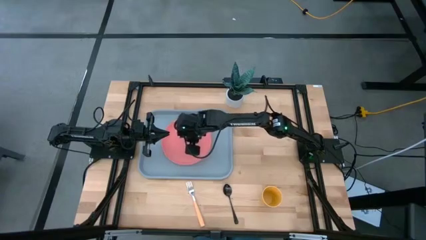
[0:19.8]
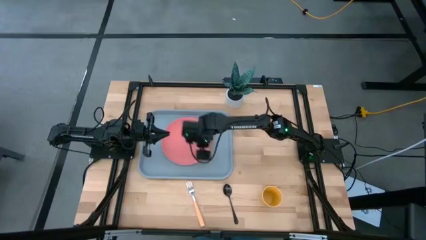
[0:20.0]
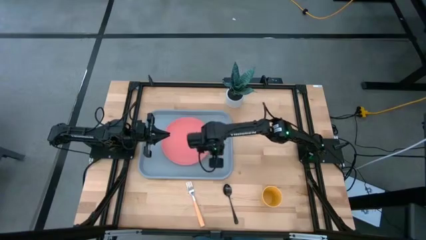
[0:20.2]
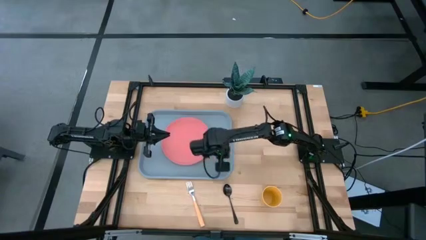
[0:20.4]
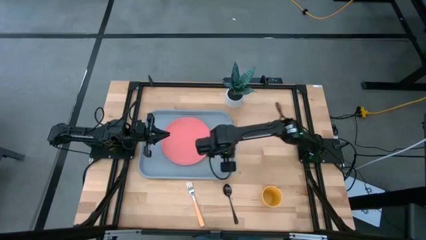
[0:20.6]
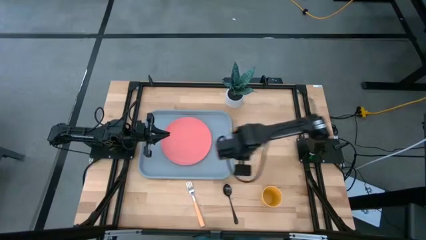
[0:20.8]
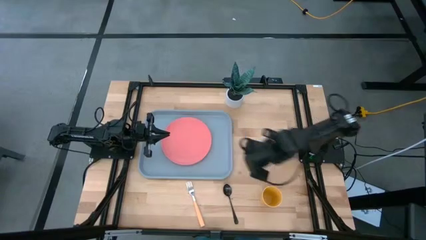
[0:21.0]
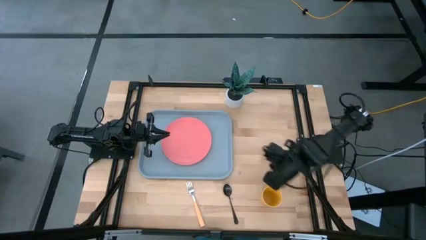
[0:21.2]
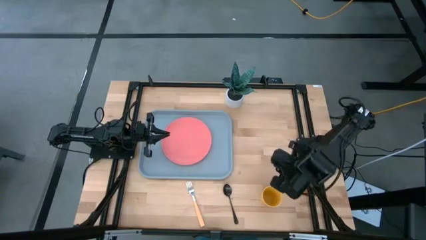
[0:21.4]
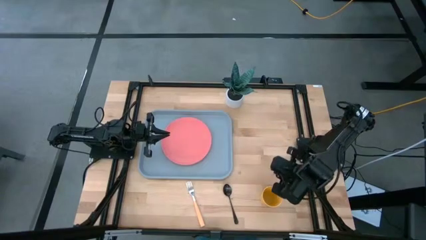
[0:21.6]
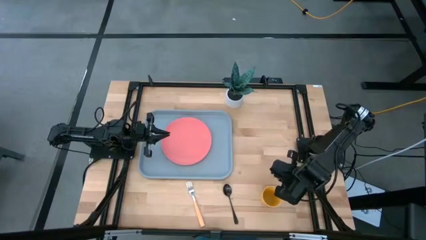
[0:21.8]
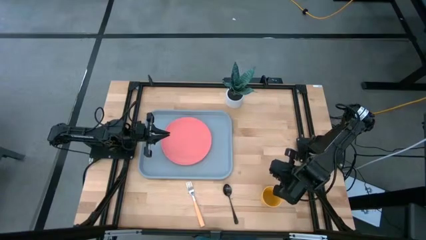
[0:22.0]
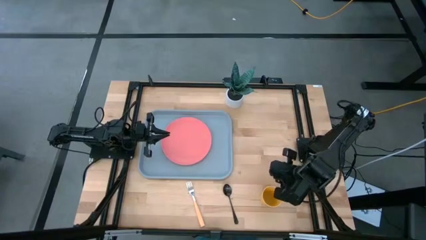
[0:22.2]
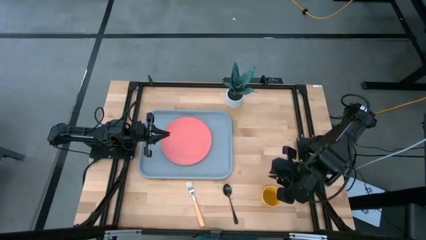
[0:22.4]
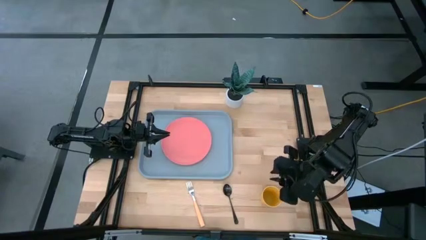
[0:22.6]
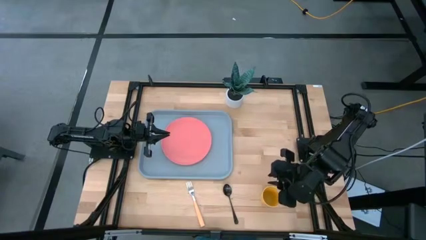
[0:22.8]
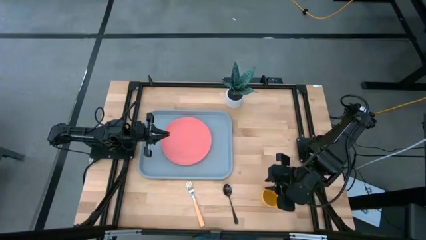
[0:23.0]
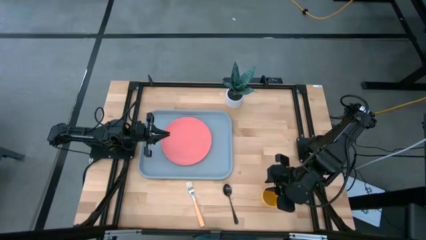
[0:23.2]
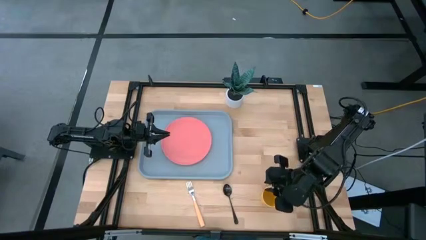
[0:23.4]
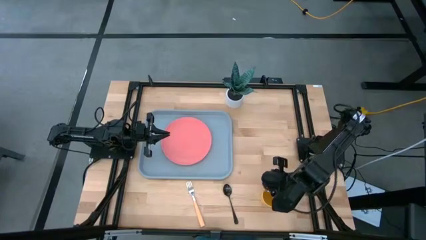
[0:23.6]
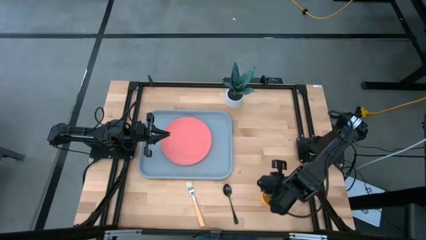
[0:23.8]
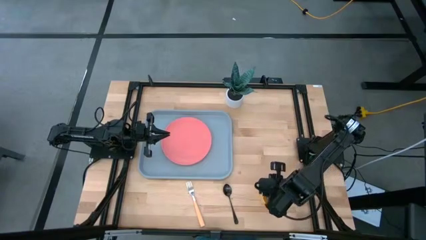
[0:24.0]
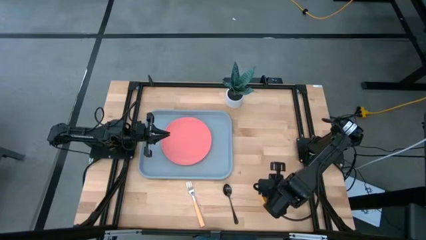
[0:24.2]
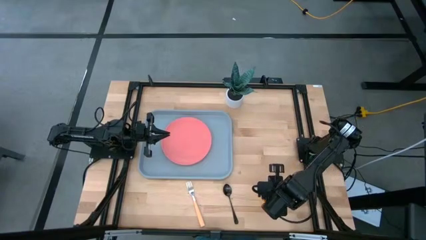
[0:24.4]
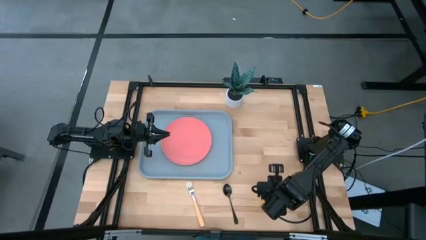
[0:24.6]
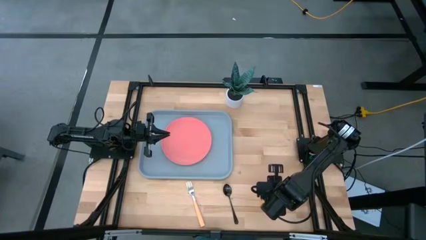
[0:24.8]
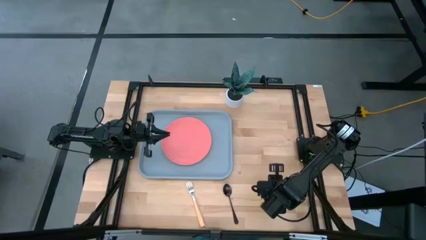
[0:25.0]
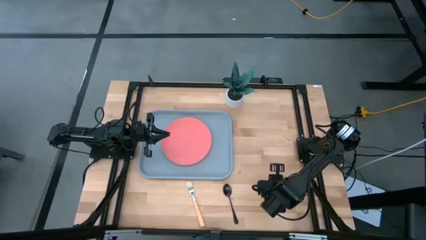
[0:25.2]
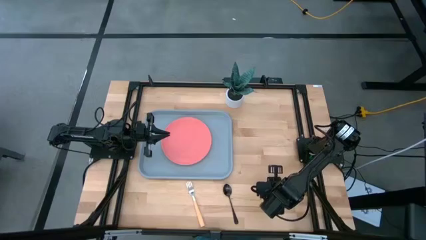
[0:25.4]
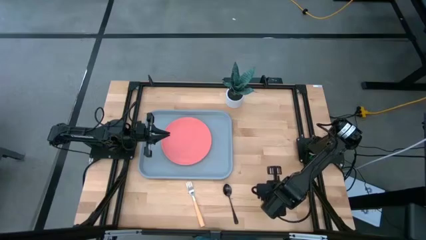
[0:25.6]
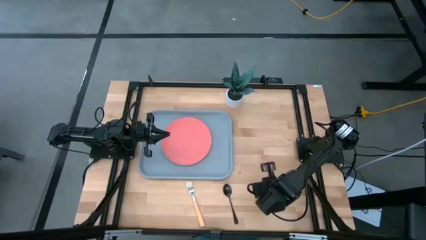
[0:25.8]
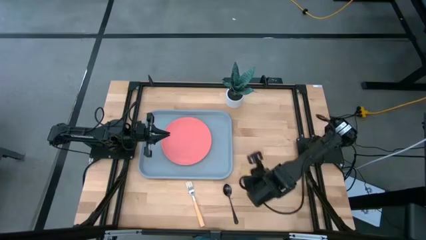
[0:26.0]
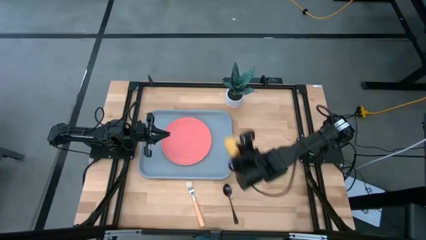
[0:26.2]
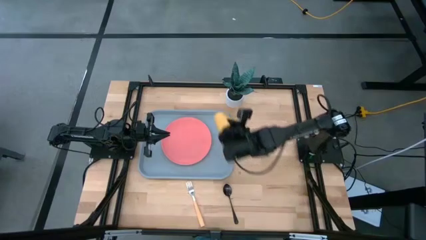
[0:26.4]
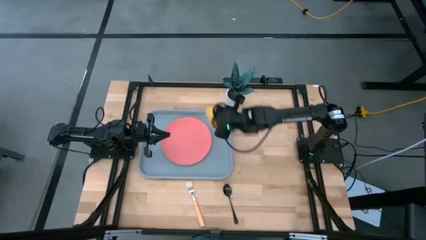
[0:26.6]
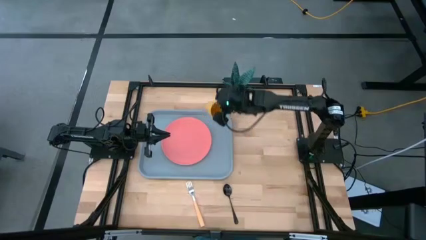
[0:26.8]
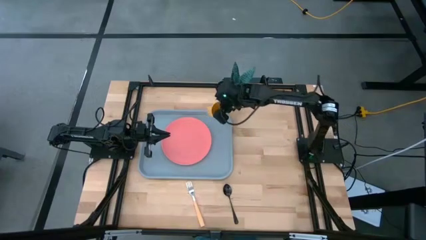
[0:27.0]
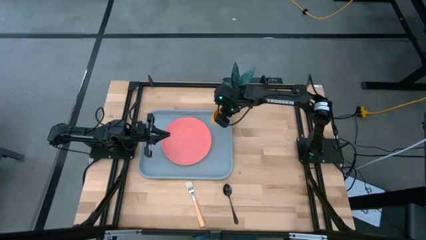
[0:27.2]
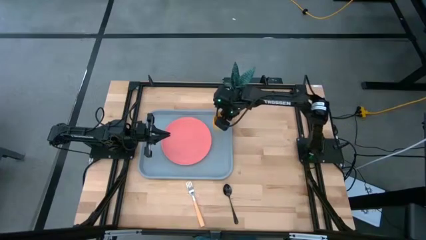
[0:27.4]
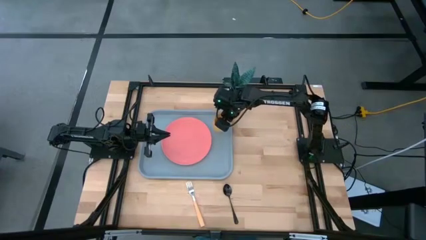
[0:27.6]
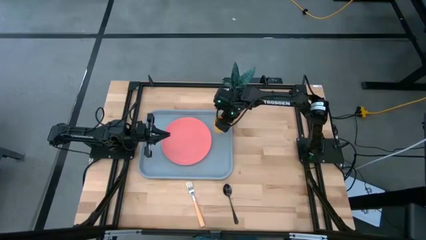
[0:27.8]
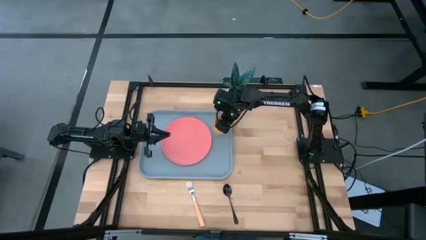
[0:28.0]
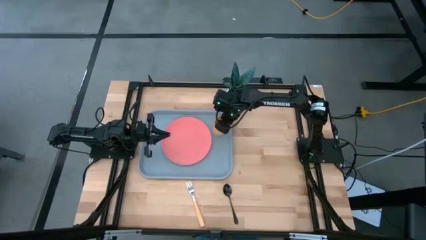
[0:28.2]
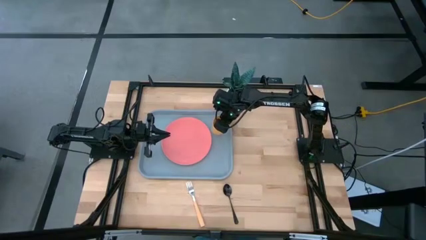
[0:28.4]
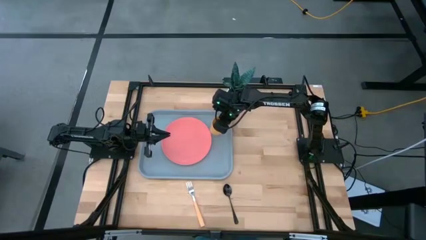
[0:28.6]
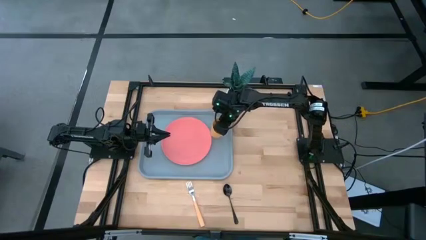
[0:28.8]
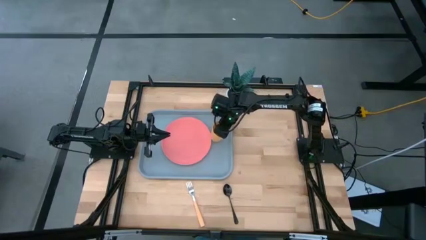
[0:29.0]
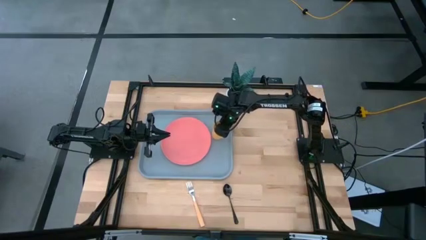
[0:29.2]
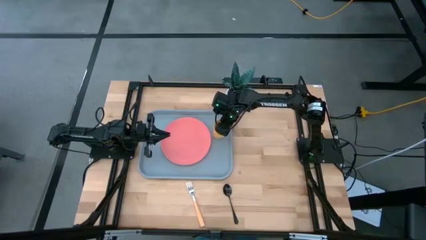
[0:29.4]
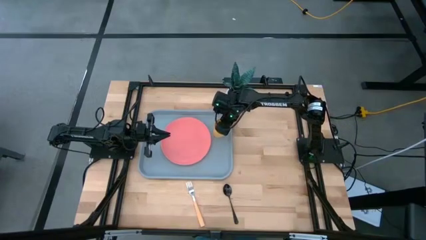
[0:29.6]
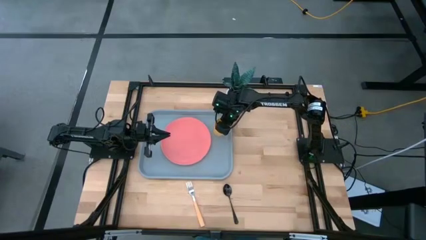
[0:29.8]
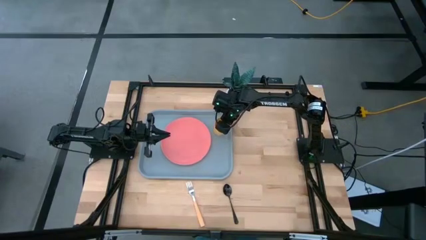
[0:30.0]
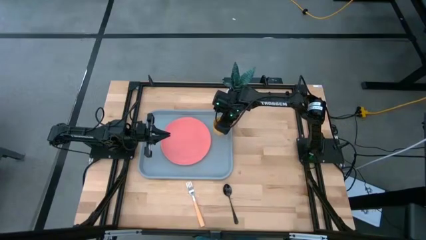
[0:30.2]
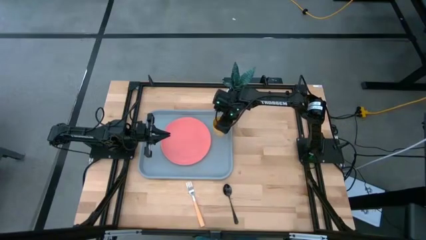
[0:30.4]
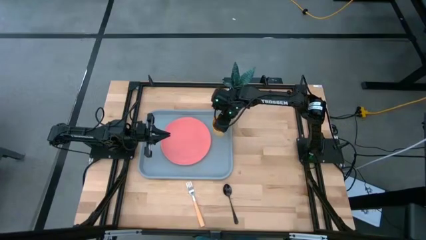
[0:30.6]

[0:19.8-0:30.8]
Task: Pick and place plate/cup/fork/spoon on tray
Put the yellow cup on the gray tray
